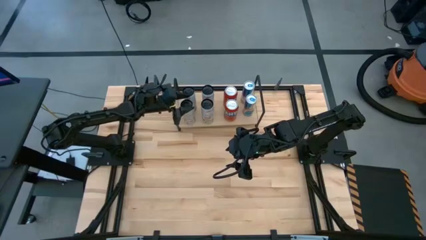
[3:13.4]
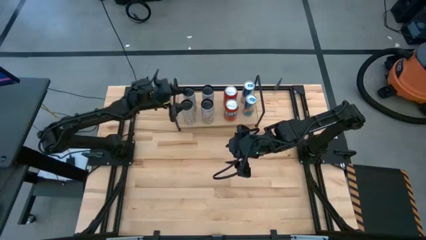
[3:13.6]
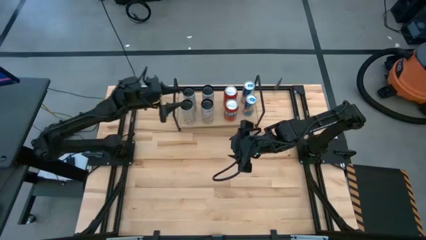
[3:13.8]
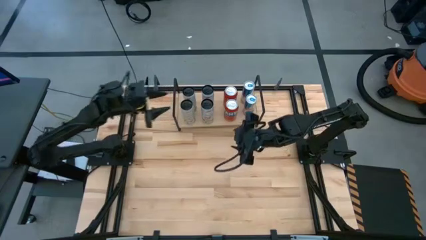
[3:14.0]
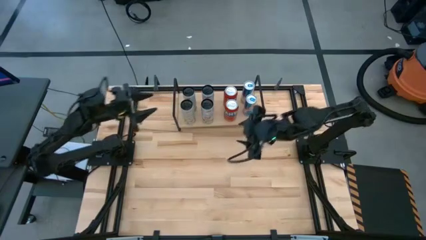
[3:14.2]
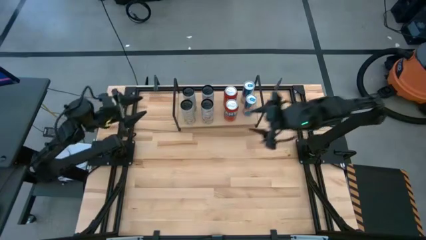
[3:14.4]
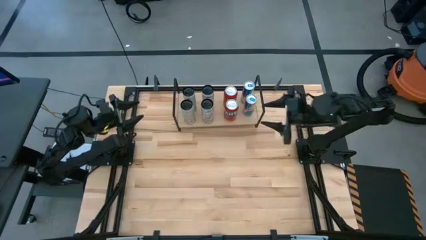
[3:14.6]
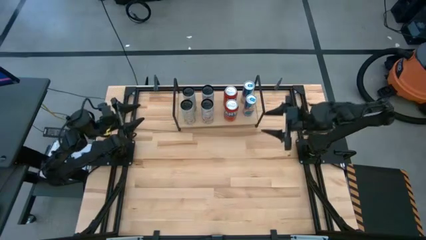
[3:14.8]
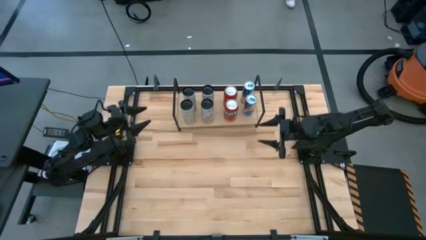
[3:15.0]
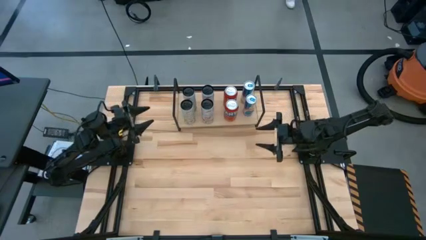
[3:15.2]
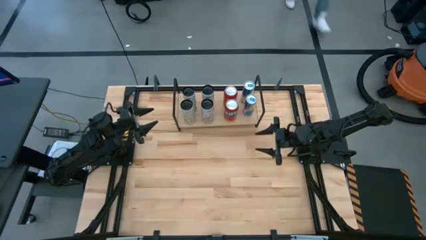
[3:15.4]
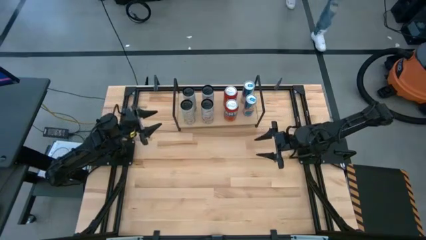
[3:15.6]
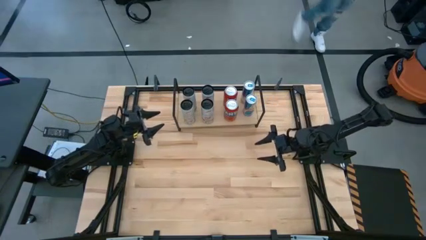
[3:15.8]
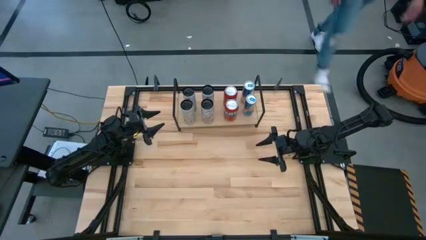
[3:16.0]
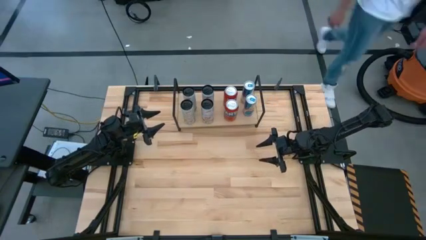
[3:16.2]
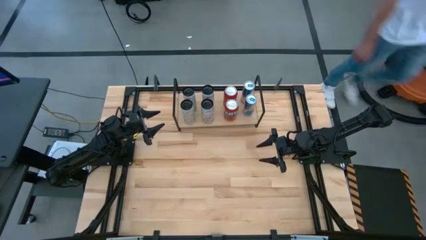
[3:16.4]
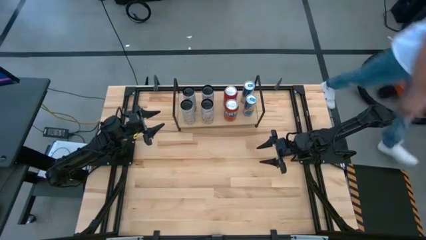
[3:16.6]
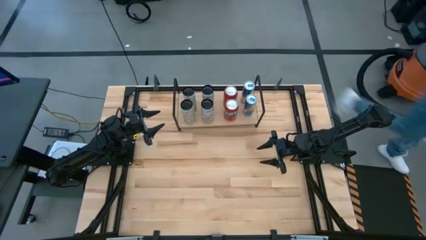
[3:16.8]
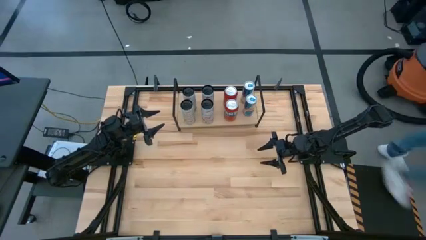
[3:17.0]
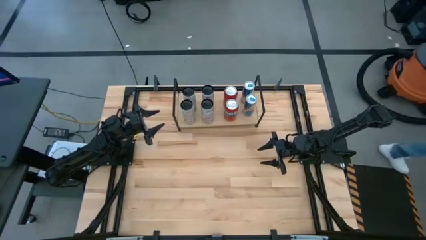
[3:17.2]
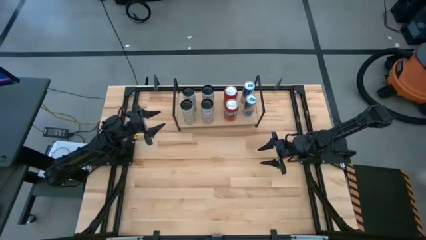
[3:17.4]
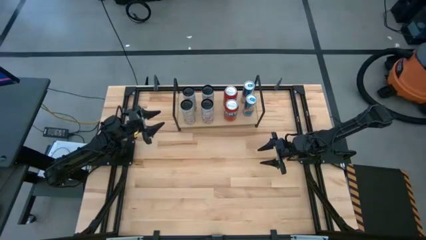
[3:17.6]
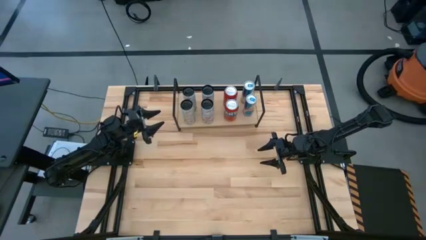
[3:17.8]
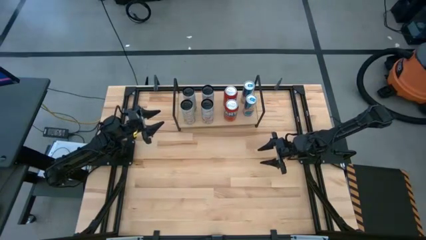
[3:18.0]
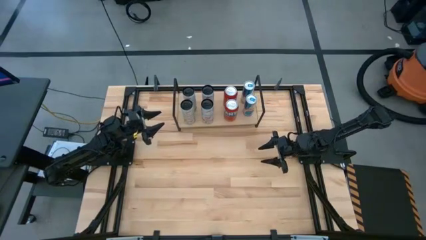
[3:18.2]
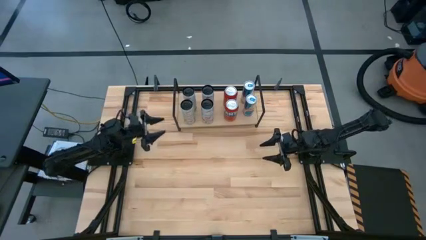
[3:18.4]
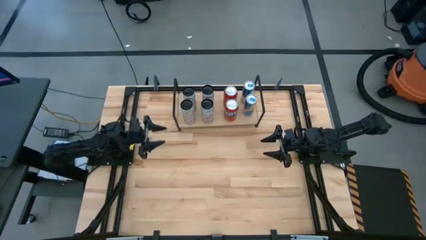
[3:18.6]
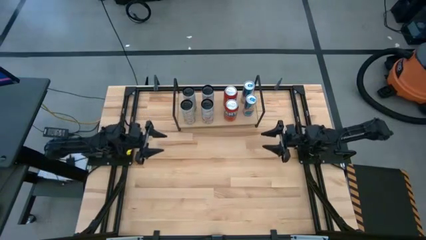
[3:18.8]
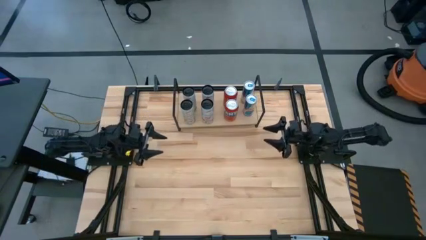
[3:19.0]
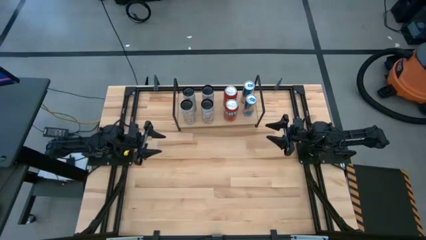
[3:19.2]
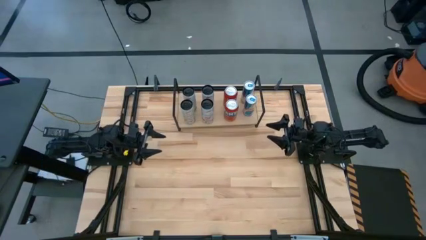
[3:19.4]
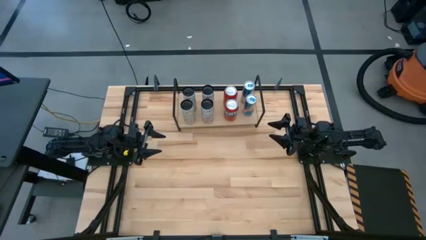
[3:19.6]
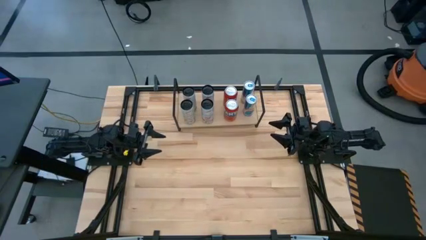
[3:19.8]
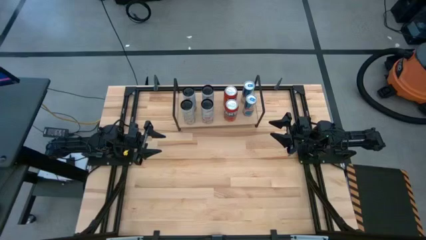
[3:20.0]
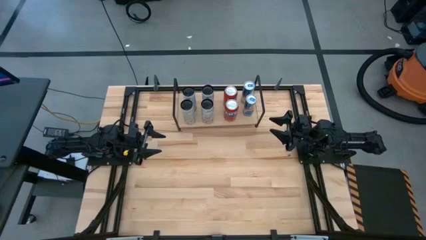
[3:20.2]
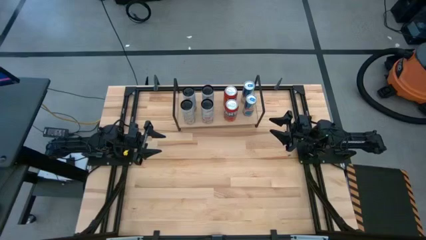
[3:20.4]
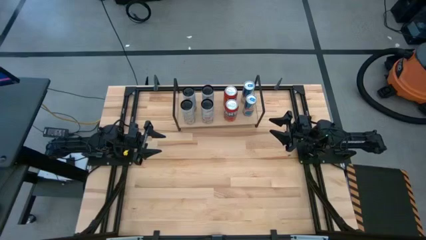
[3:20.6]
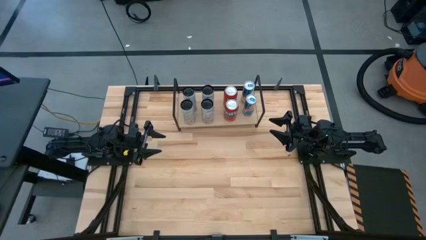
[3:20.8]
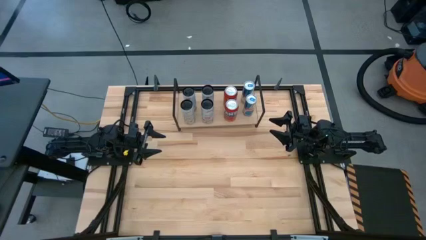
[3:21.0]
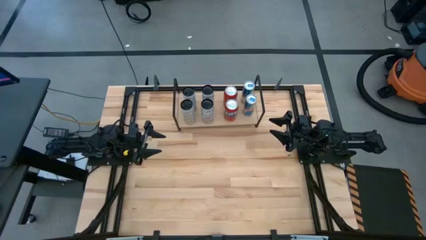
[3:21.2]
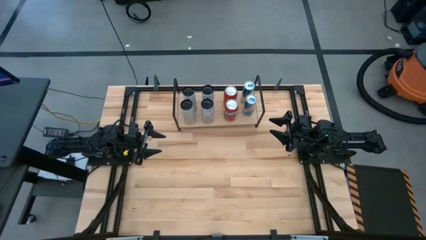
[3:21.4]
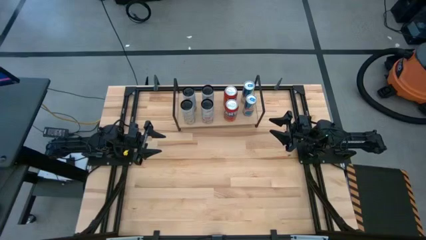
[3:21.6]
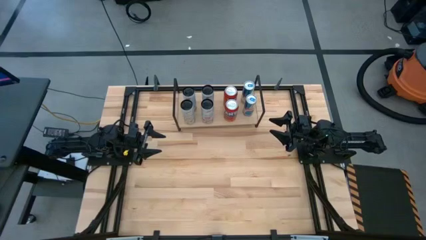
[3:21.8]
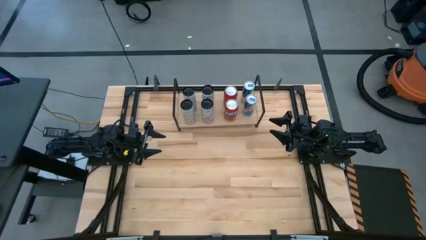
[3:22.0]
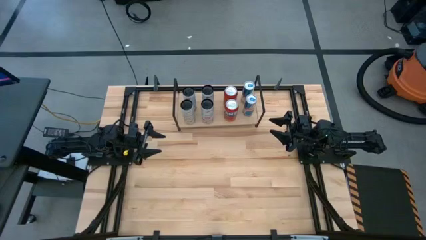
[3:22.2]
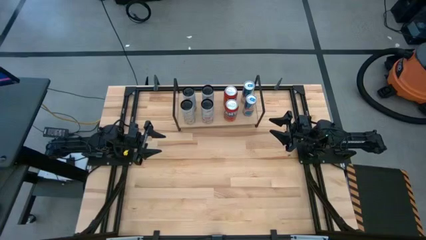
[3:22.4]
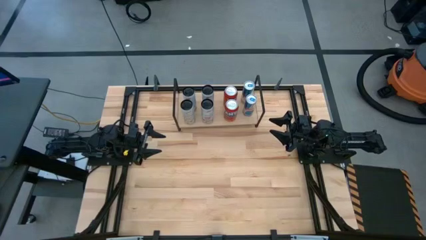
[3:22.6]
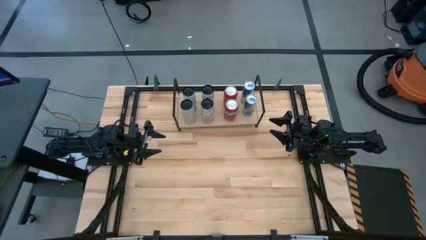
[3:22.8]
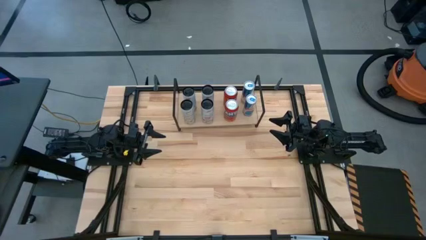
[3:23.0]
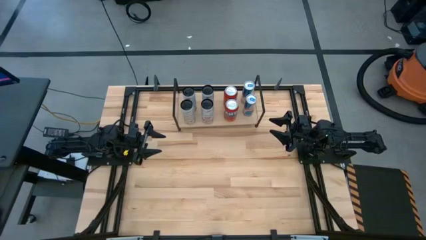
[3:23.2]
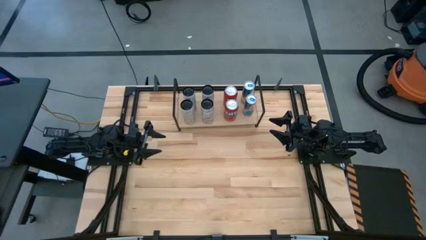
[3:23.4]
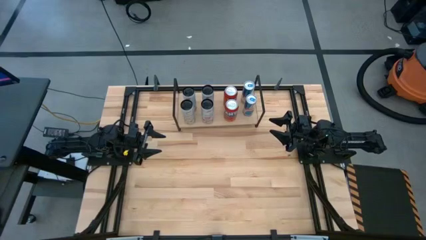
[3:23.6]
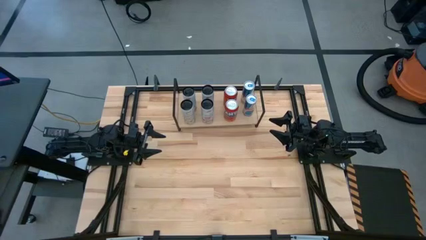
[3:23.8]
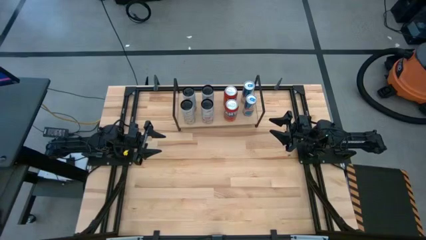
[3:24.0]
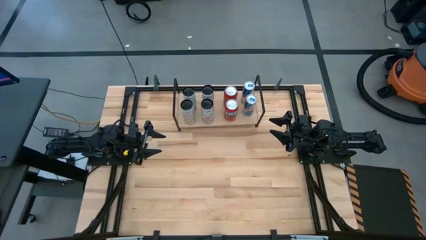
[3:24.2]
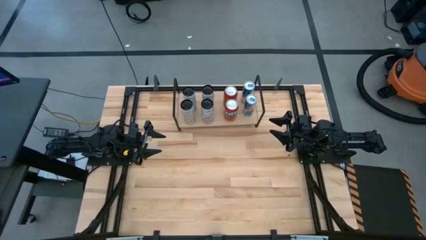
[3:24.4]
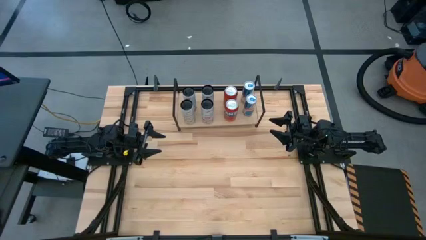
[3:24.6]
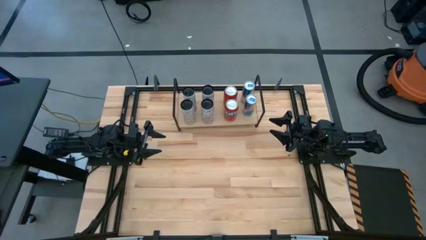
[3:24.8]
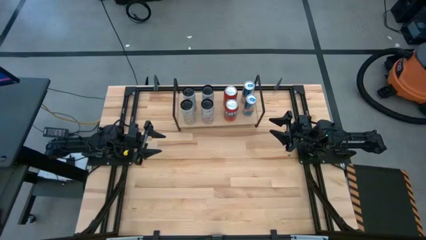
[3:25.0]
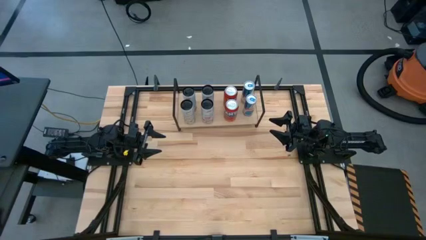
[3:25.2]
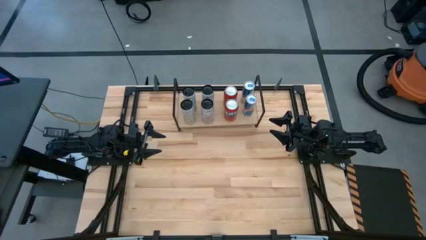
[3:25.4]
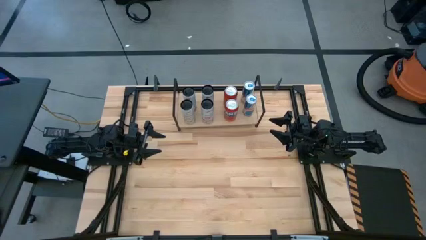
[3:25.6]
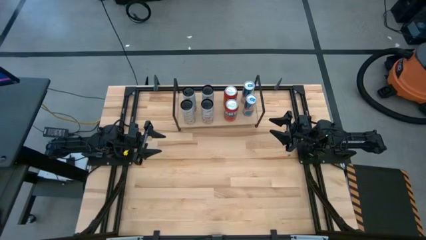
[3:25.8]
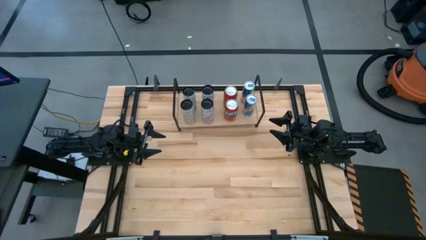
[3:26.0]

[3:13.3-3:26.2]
Task: Place canned beverage on shelf
Return to Home Position
